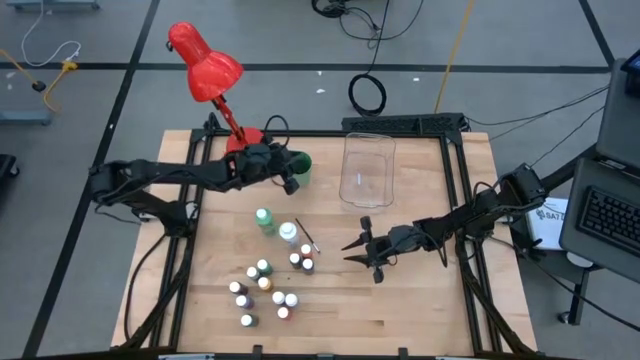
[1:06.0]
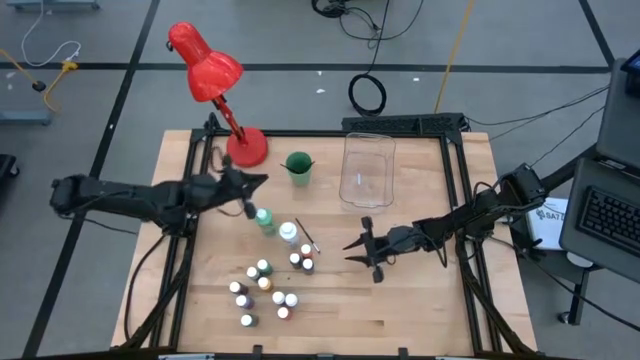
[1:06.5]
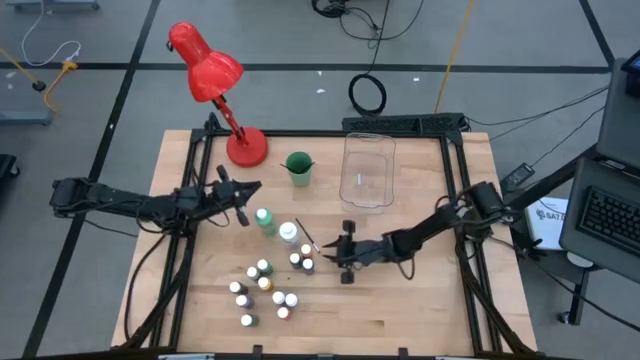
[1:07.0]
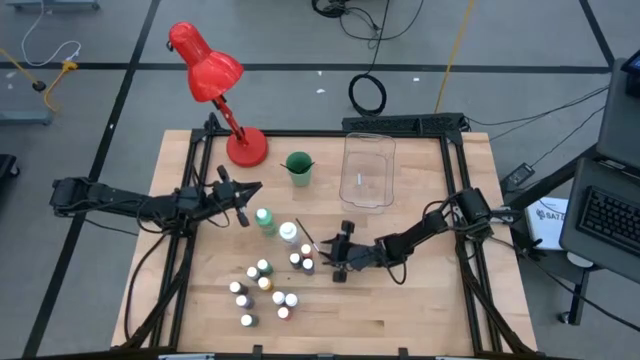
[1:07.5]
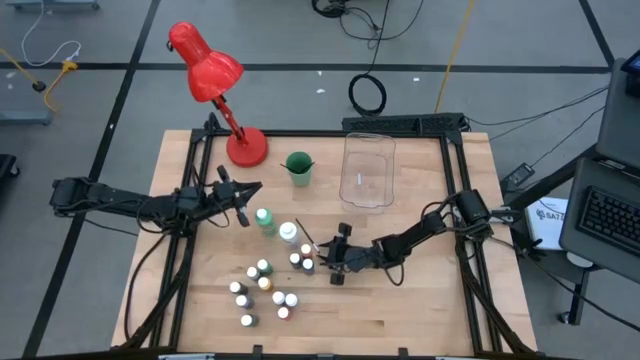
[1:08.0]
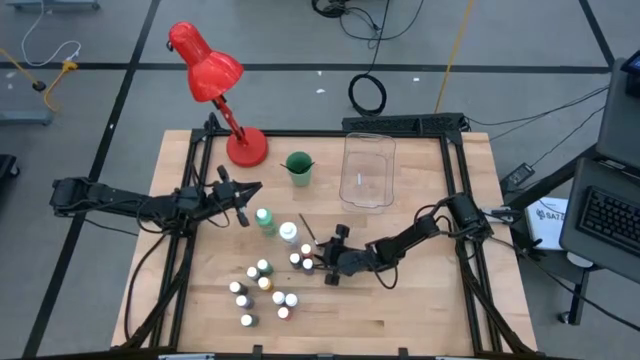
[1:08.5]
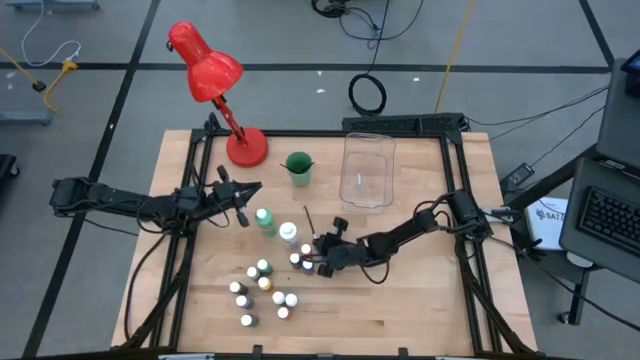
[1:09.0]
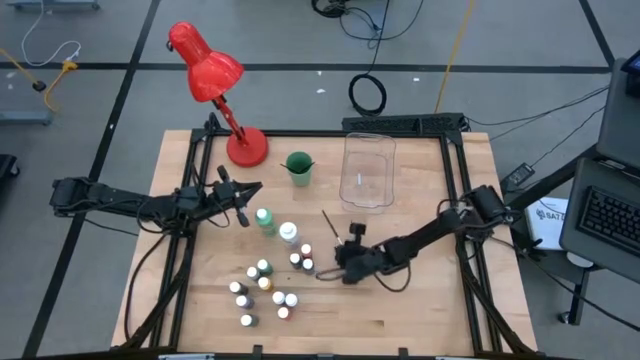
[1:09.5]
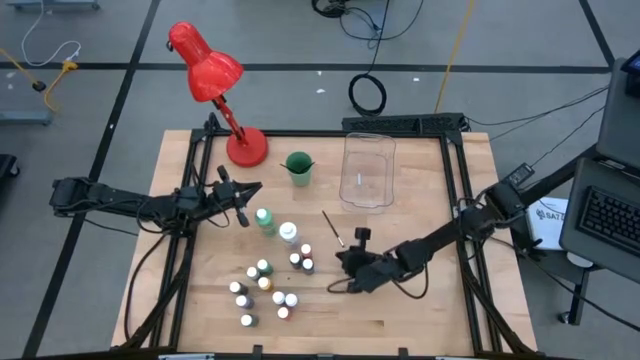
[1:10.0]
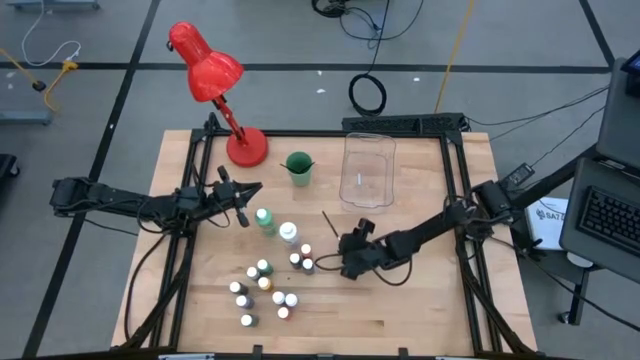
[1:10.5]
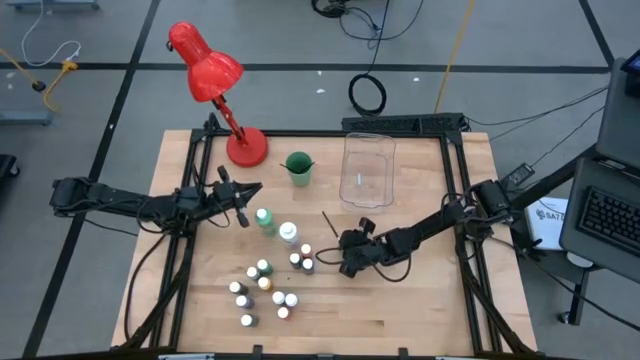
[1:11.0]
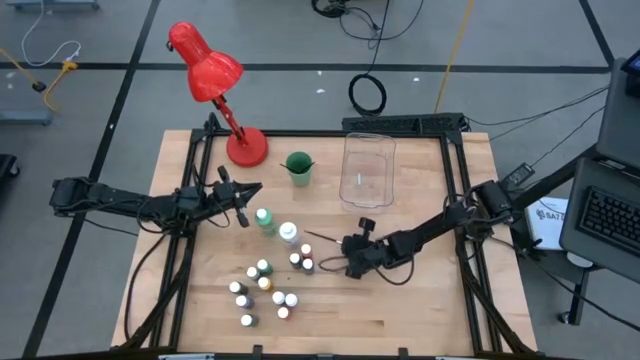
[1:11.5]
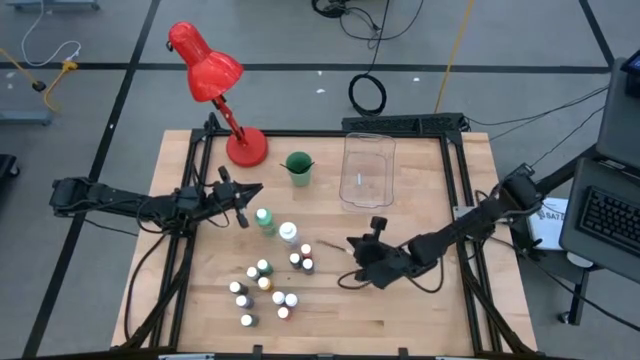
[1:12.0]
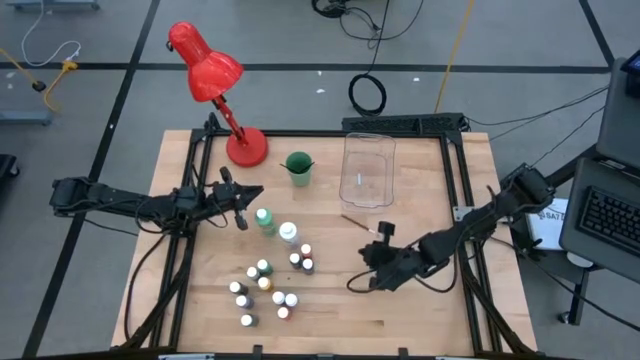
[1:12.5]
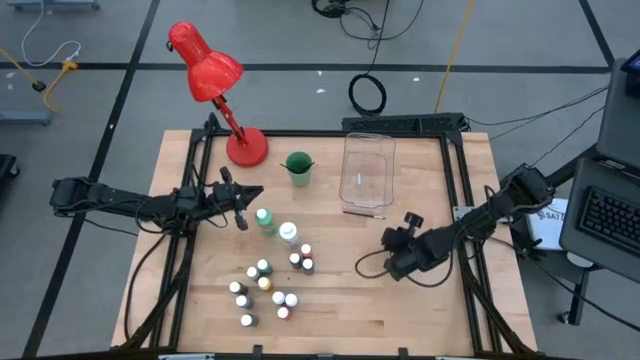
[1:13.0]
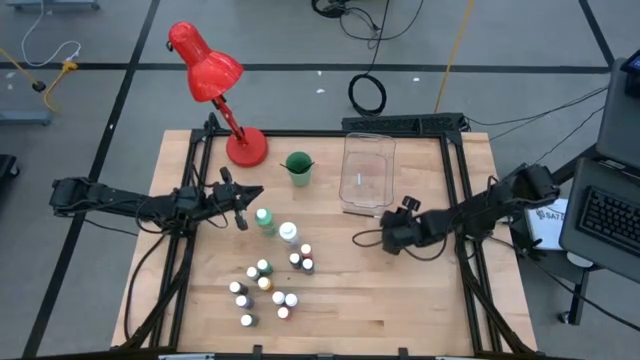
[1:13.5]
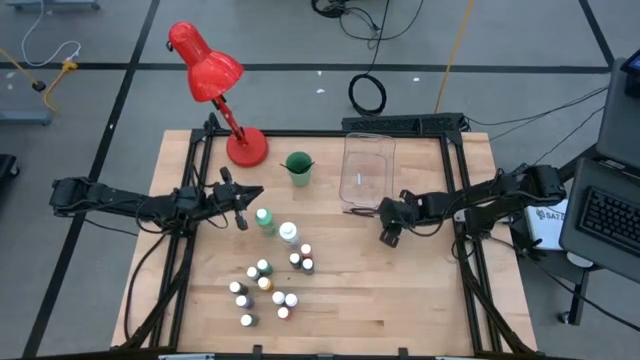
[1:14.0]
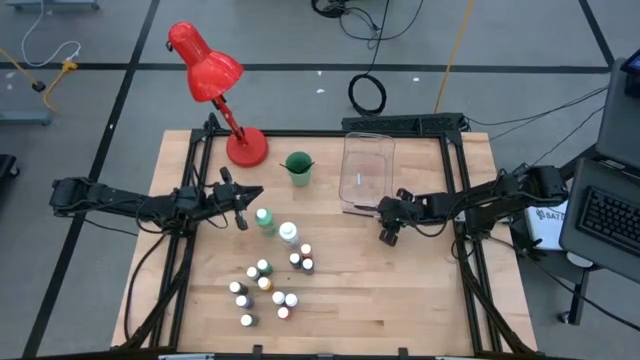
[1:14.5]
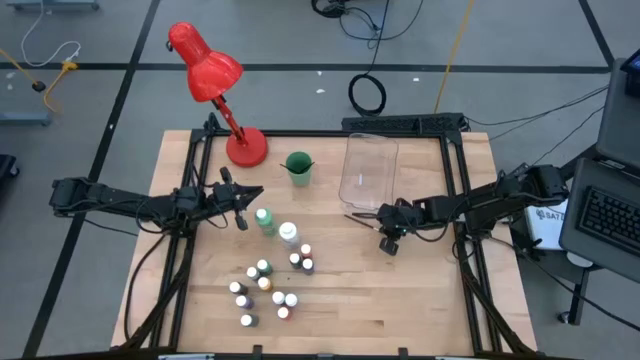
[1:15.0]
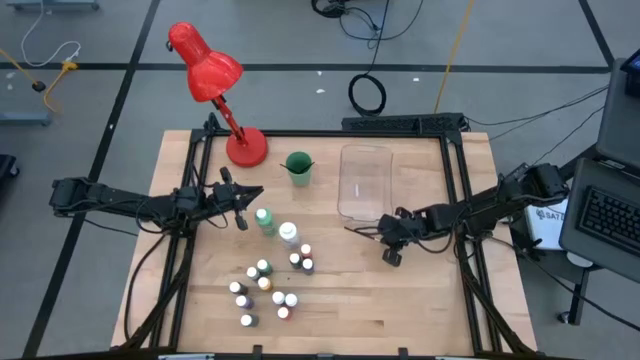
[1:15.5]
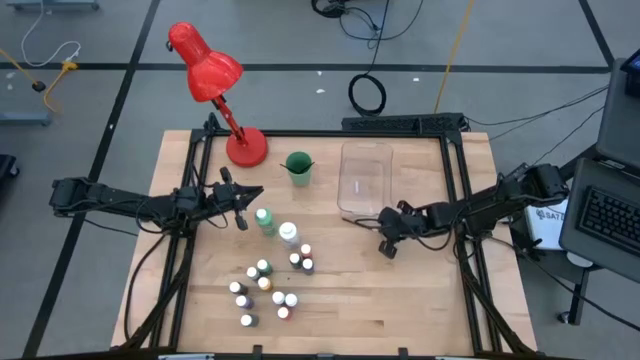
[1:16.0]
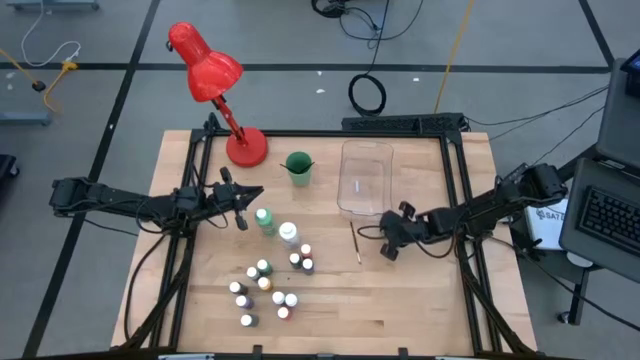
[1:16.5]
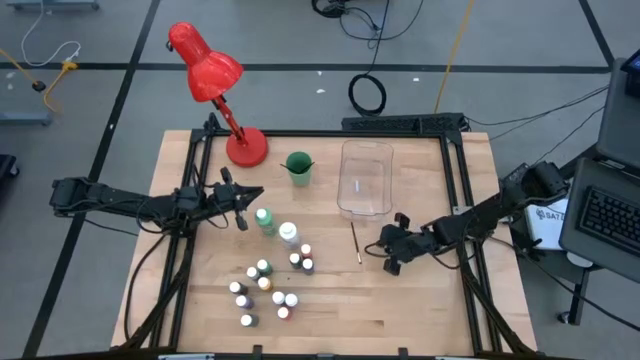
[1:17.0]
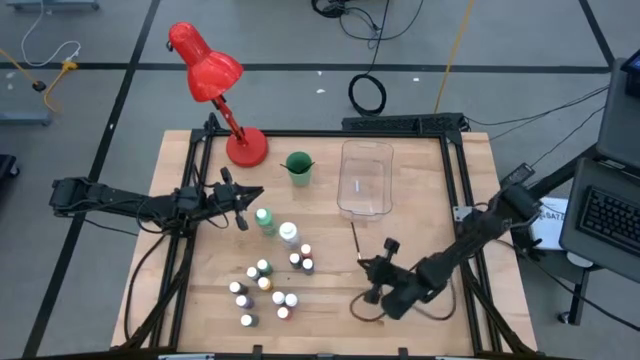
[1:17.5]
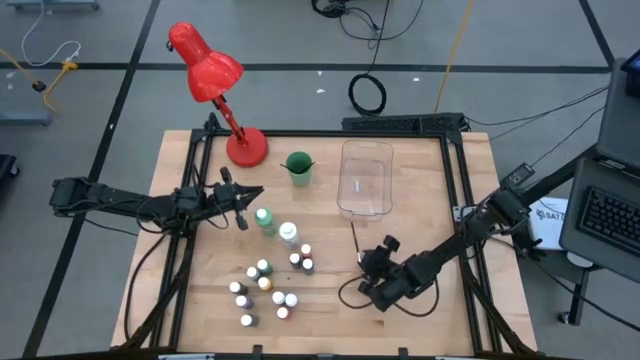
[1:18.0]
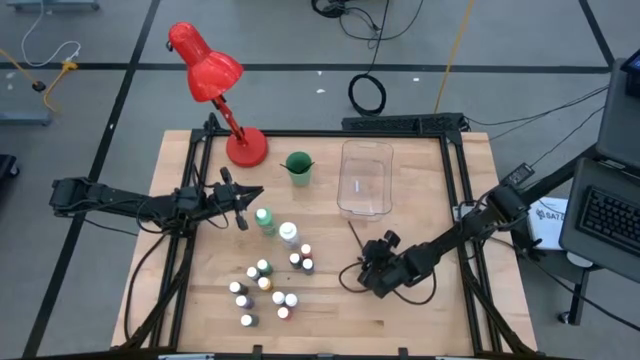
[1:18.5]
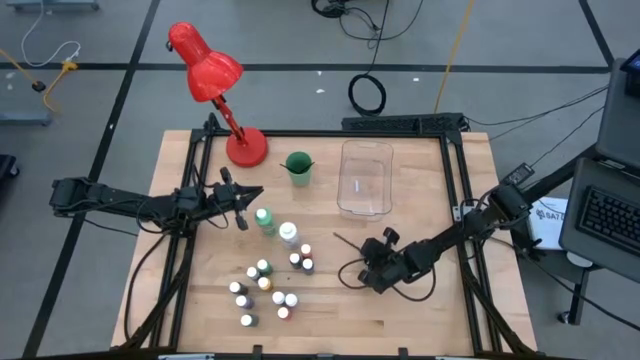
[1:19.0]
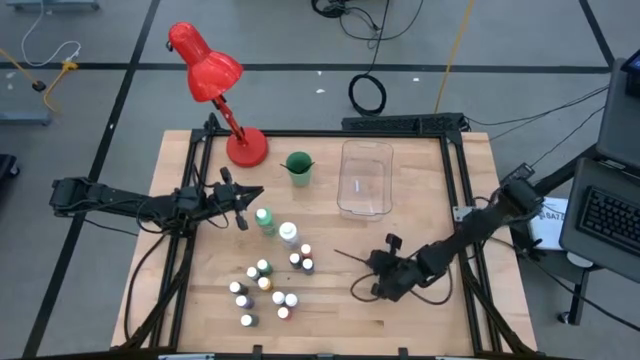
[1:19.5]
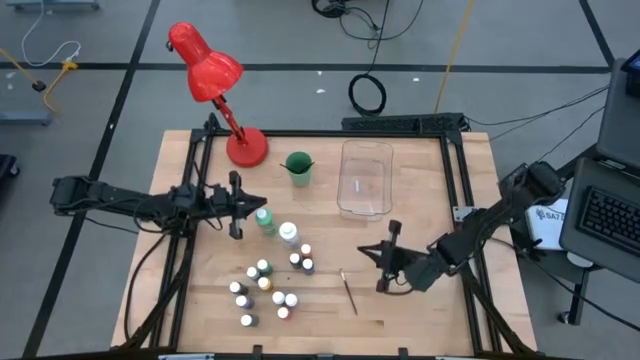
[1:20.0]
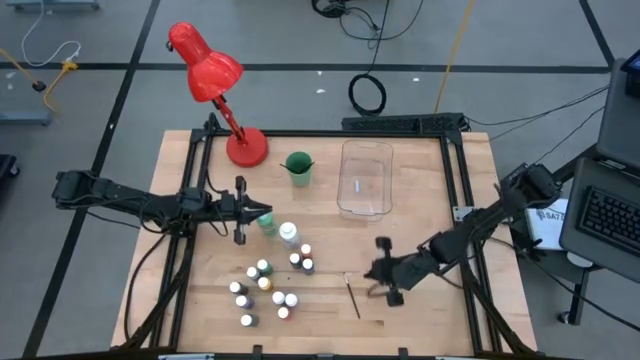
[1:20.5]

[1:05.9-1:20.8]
Task: Pick & Place Paint Supplies
Put the silver paintbrush into the green cup

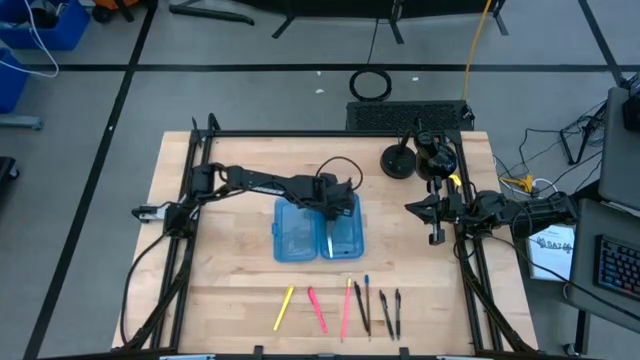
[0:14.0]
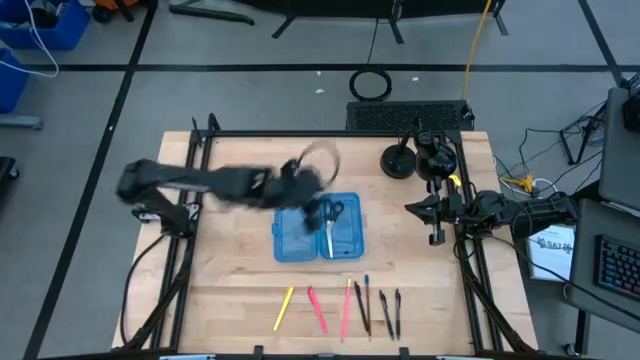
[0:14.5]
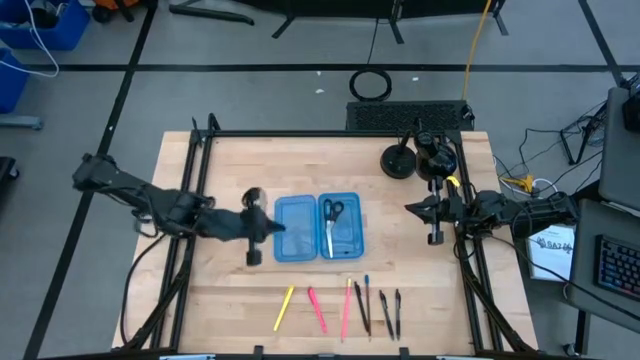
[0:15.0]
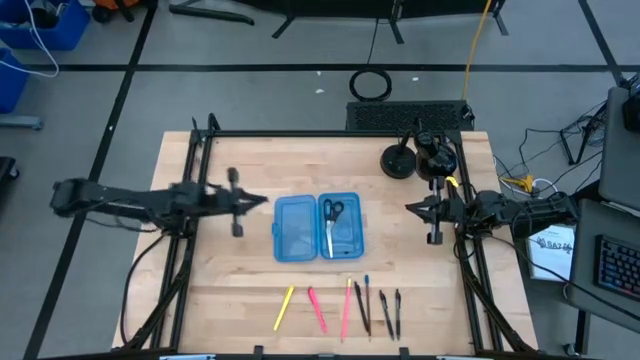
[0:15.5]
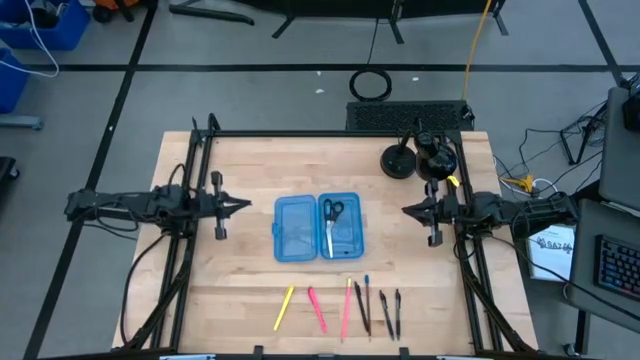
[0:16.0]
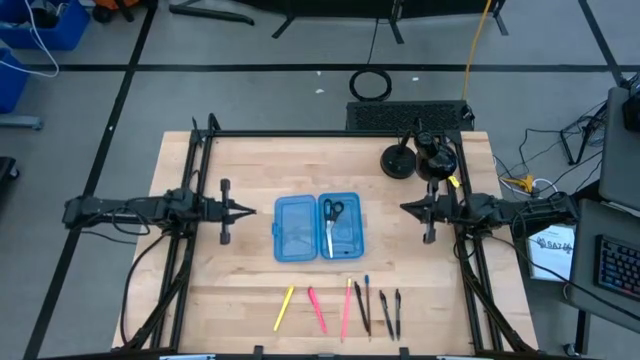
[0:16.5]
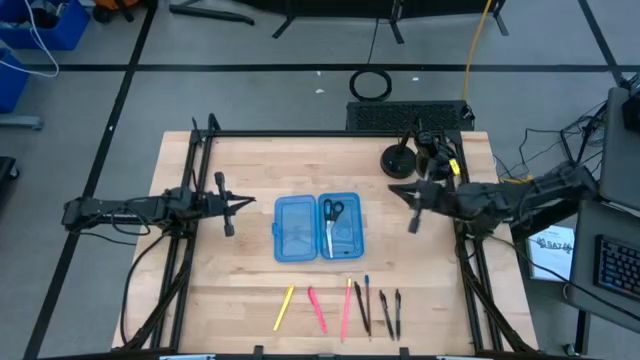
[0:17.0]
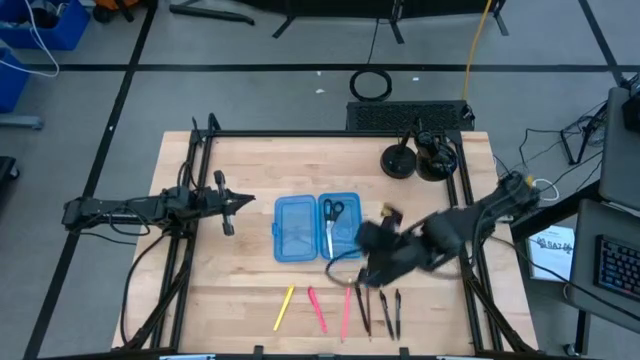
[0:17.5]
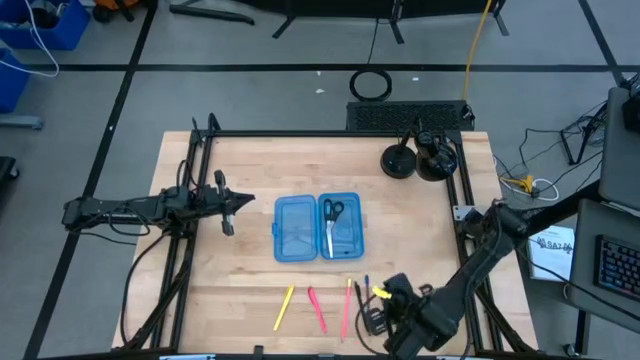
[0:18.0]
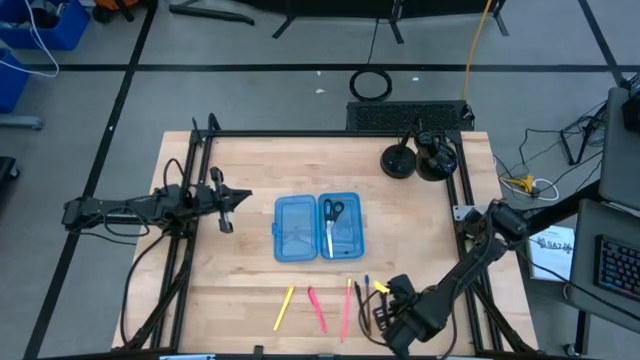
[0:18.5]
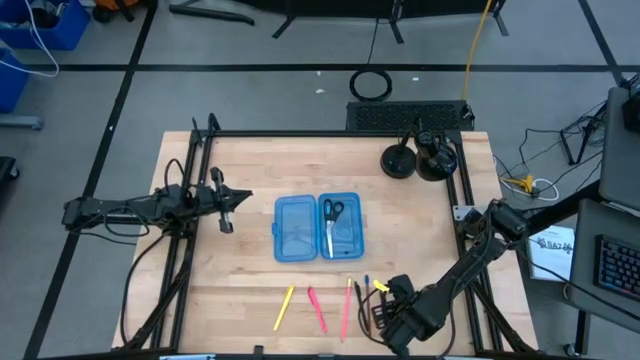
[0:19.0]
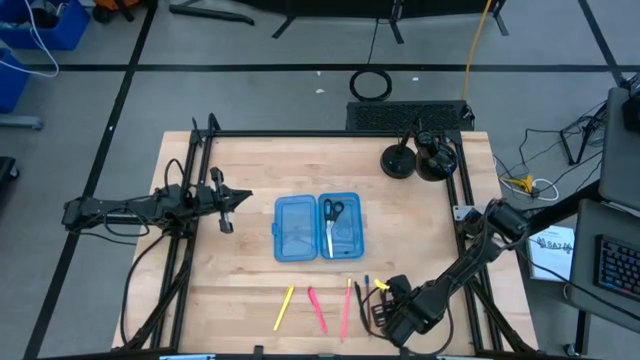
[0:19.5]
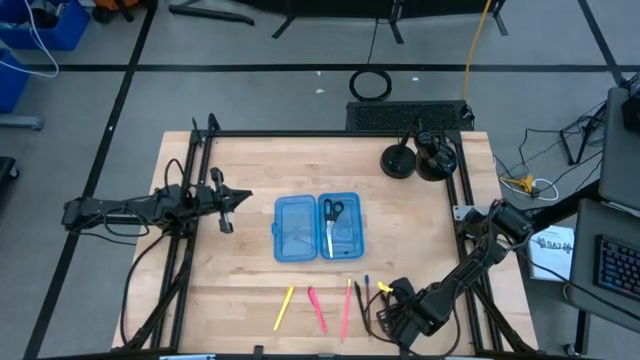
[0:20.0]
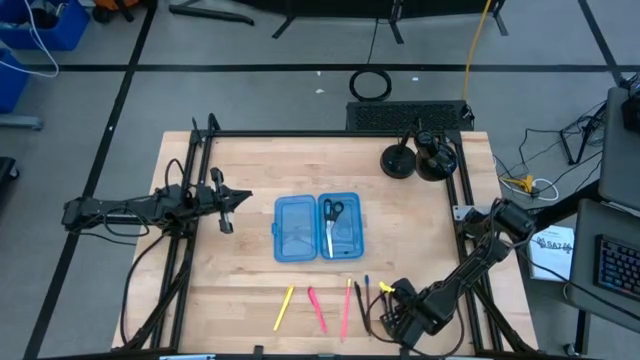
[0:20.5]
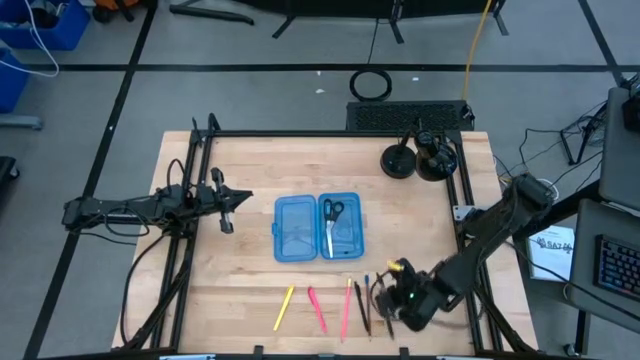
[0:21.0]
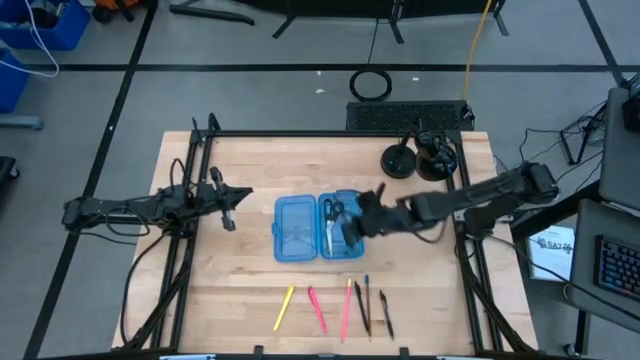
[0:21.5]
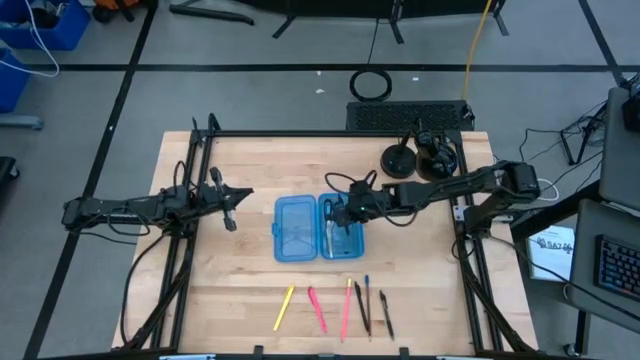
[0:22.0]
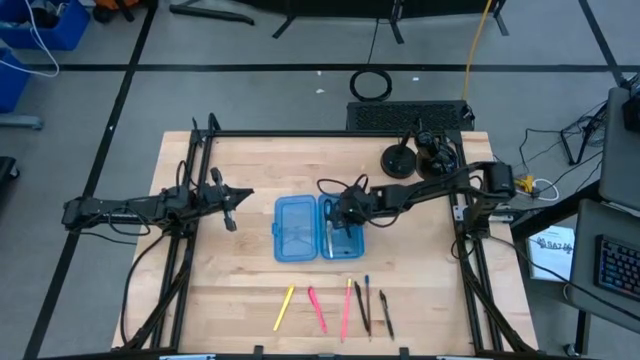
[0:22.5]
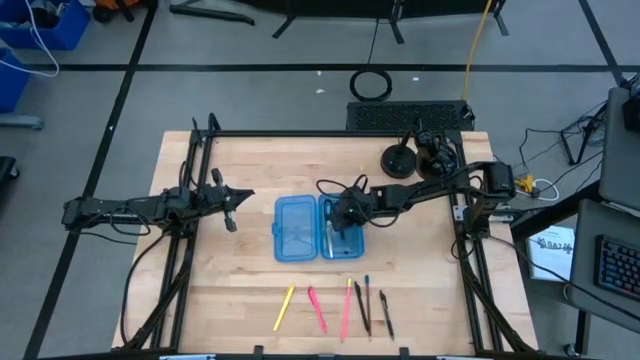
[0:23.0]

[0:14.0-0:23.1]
Task: Pick & place school supplies into a supply box
Put the right transparent pen into the blue supply box
